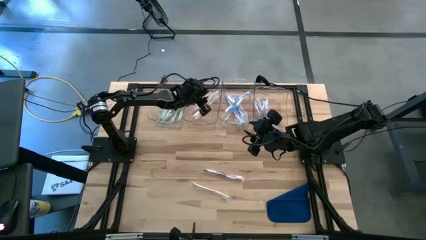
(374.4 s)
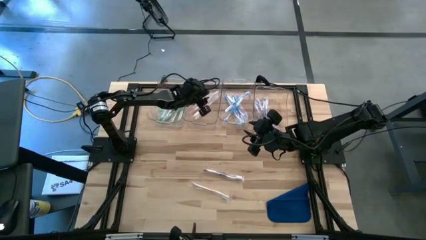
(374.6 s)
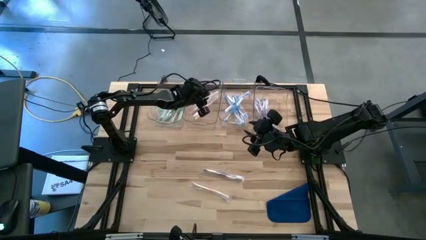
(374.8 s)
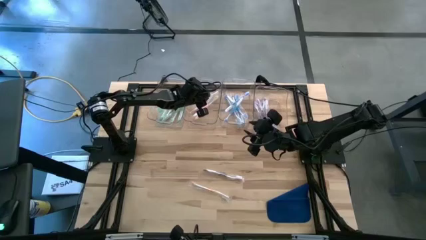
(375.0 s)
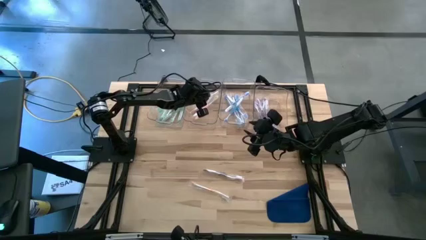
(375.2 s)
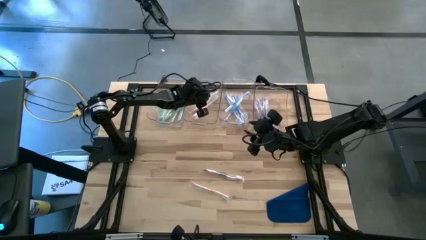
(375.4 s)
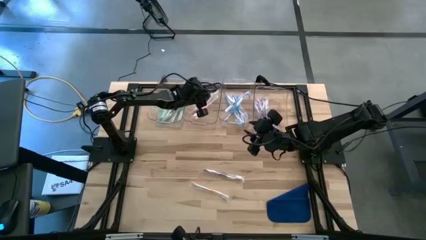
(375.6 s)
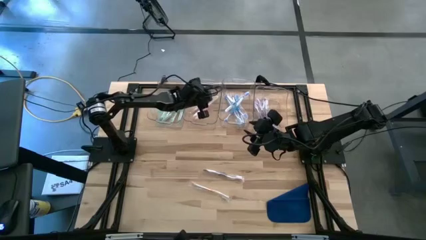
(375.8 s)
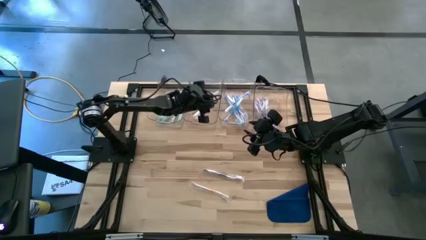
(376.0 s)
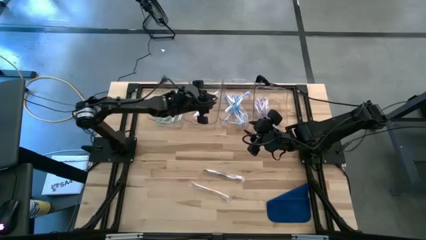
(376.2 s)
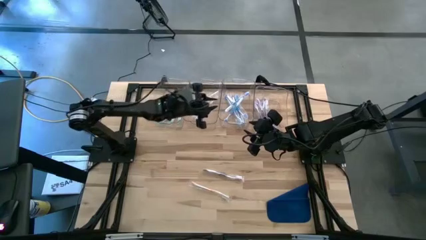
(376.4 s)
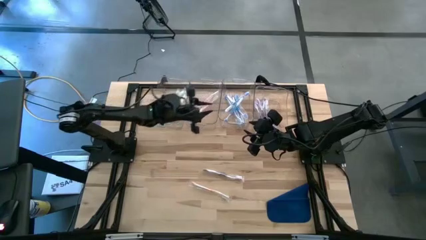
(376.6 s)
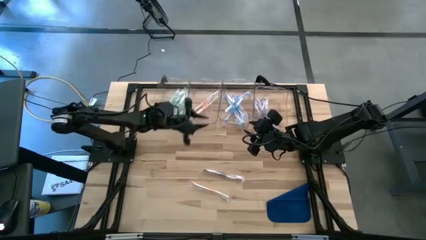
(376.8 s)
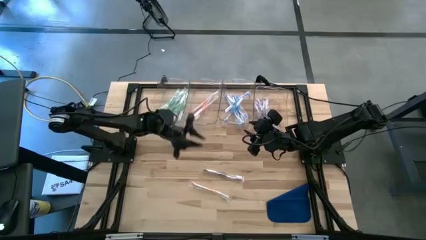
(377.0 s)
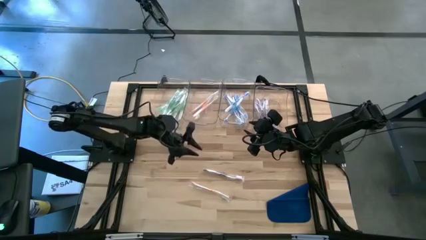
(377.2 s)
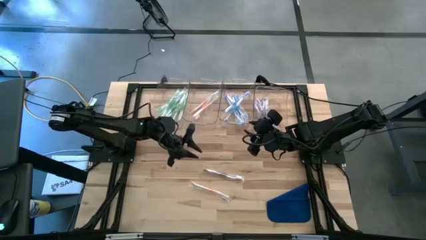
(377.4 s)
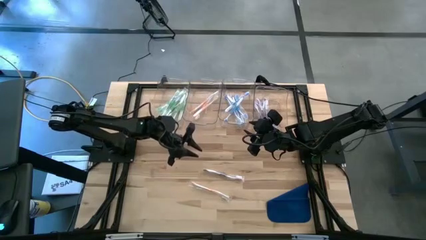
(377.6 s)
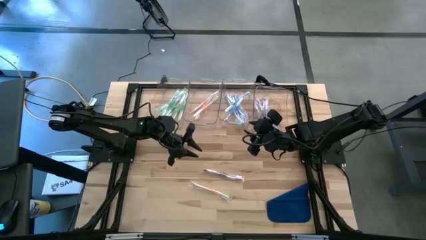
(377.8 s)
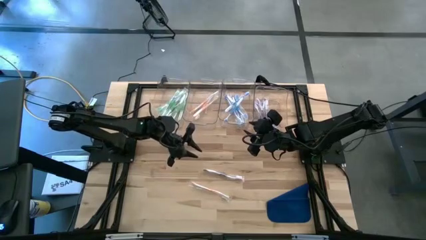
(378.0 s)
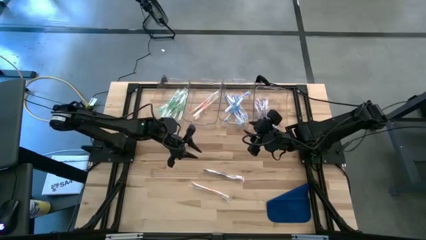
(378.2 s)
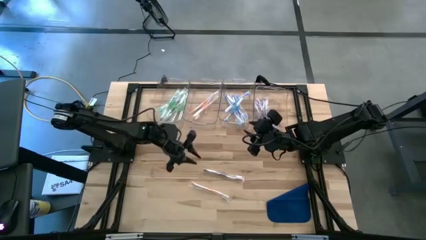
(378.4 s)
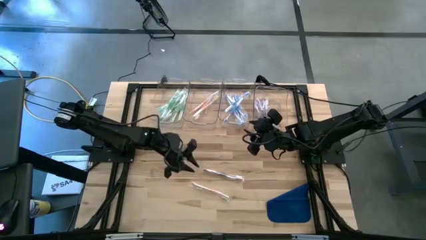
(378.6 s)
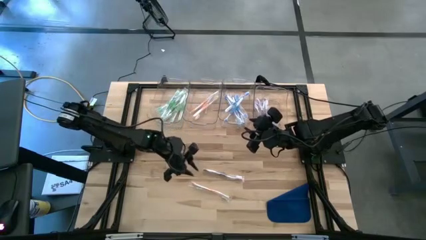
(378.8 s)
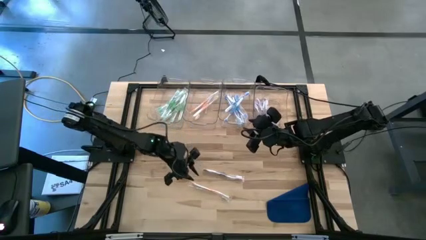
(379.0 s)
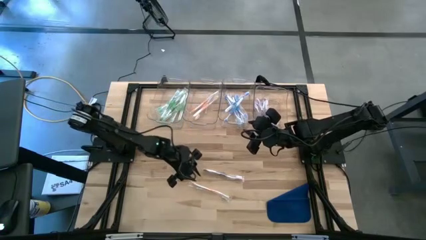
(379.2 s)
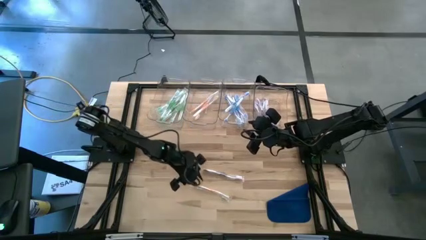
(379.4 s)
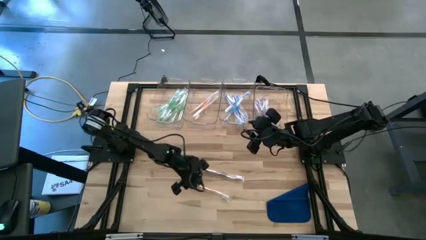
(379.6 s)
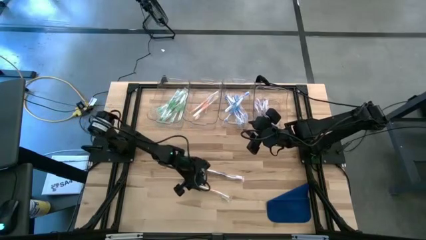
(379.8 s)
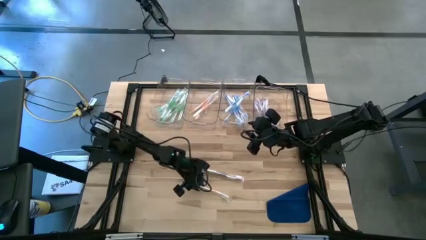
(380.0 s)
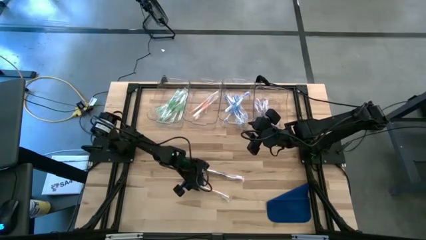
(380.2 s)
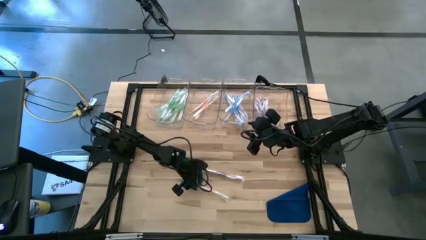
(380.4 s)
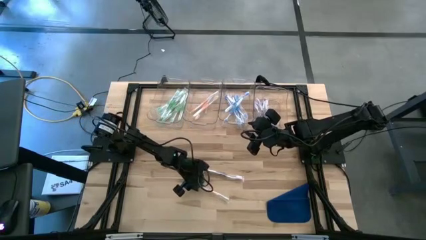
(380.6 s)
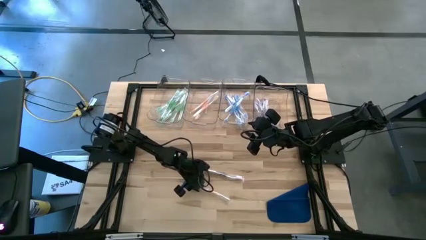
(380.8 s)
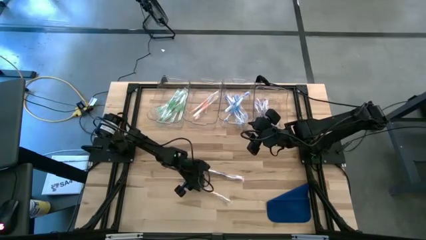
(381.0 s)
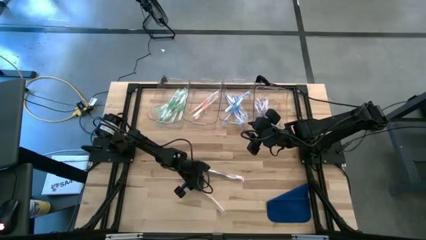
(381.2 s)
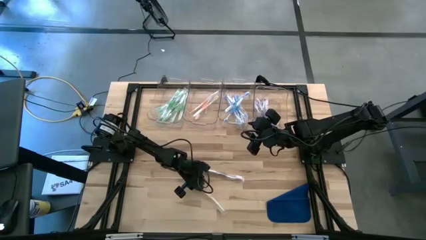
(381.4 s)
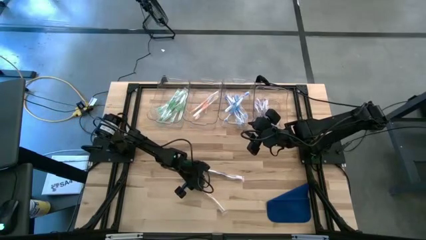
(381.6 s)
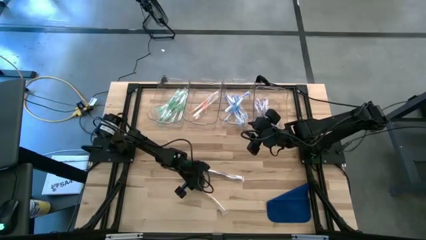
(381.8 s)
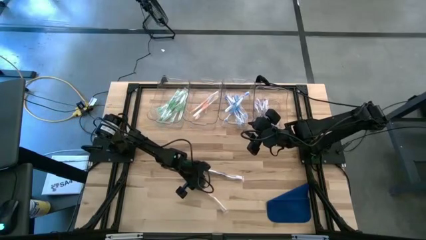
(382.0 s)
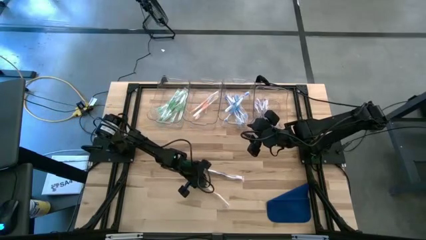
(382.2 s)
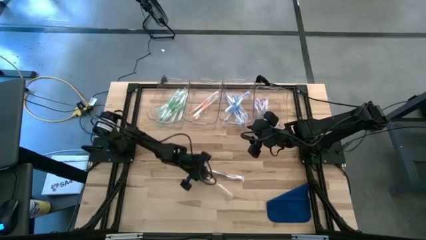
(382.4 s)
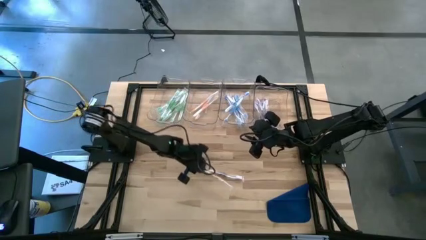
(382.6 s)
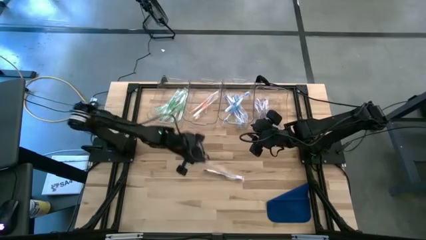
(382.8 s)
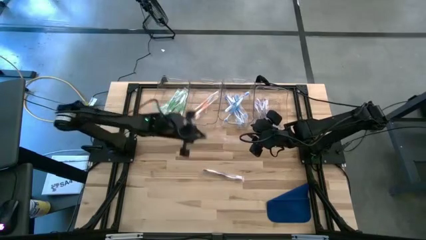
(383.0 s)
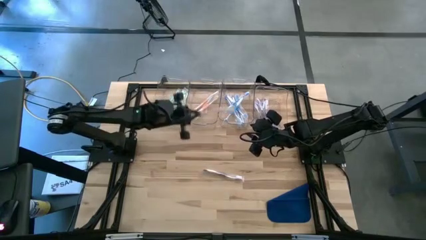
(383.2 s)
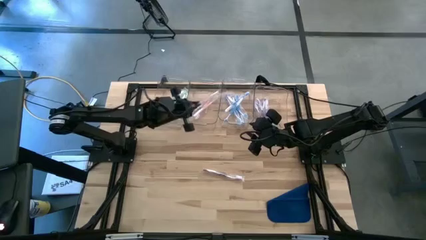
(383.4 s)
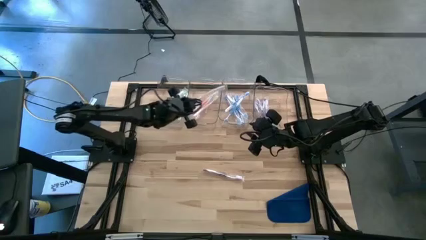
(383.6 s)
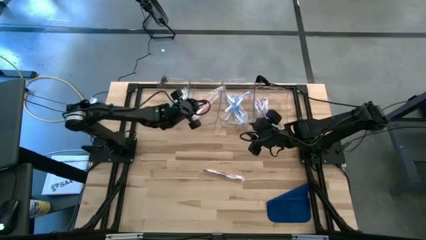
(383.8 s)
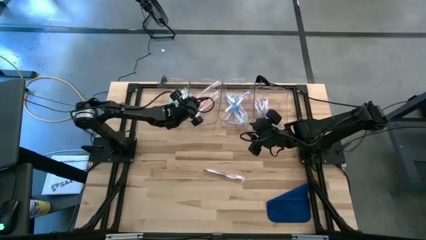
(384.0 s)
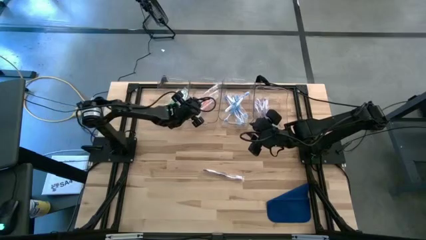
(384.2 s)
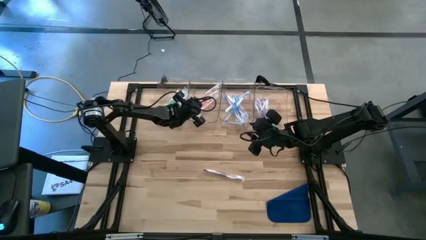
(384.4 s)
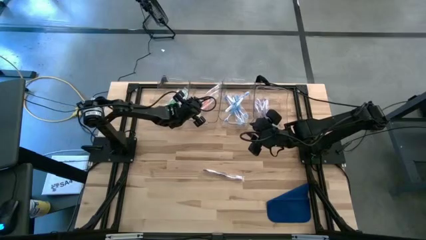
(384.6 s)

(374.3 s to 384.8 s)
Task: Pick & Place Toothbrushes
Put the orange toothbrush into the middle left transparent bin

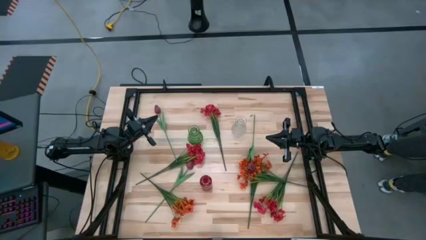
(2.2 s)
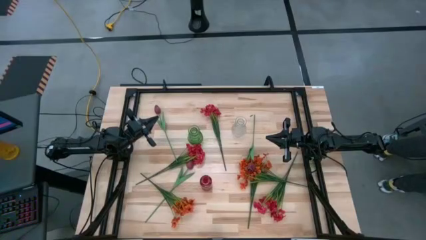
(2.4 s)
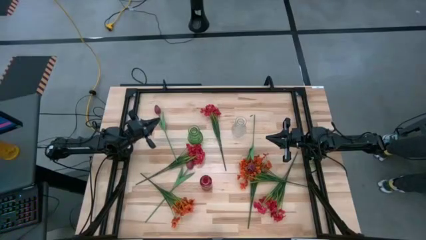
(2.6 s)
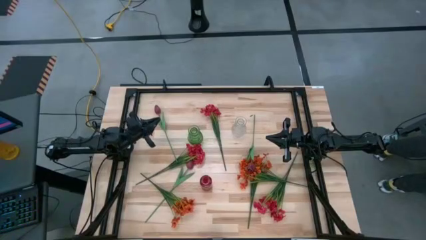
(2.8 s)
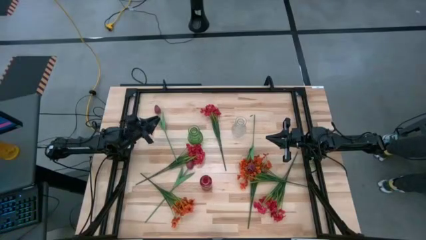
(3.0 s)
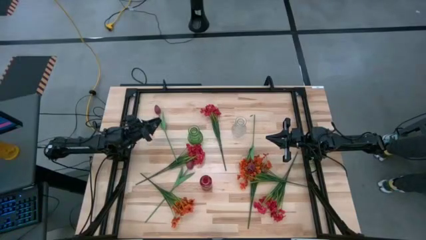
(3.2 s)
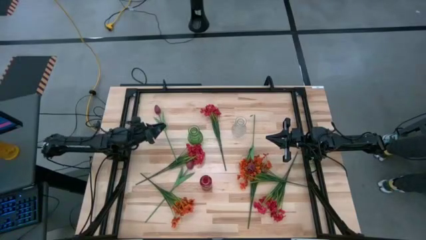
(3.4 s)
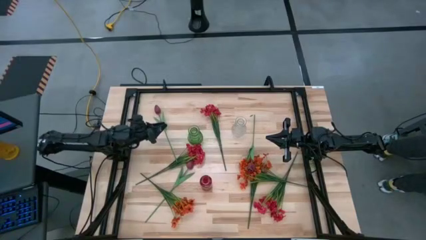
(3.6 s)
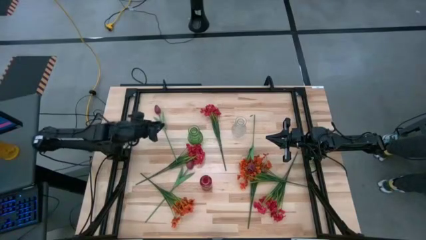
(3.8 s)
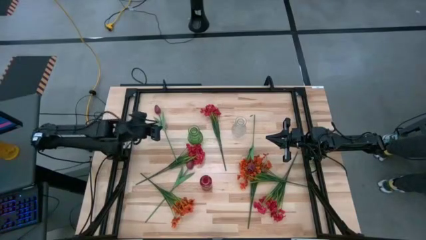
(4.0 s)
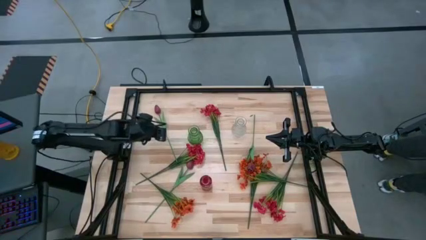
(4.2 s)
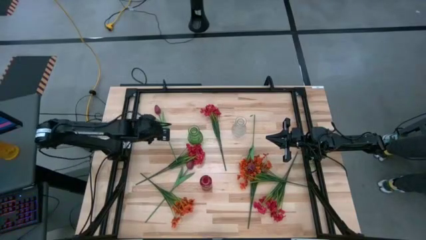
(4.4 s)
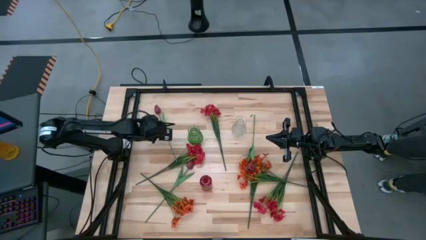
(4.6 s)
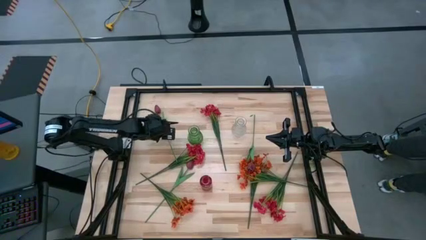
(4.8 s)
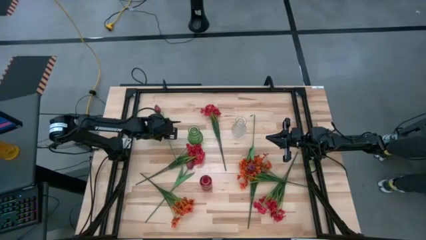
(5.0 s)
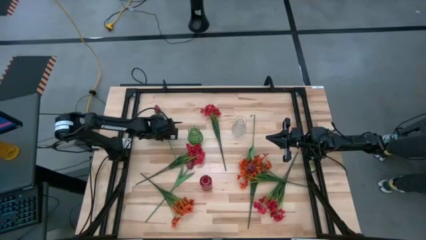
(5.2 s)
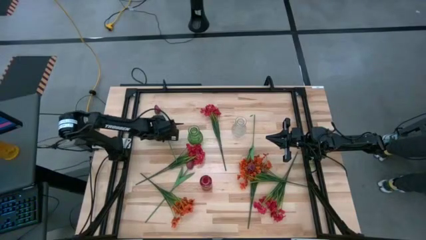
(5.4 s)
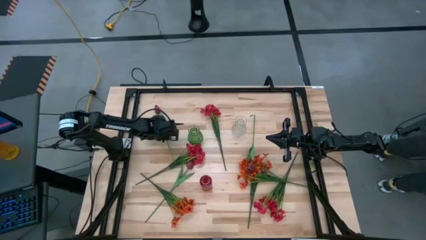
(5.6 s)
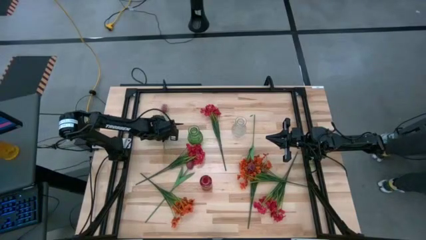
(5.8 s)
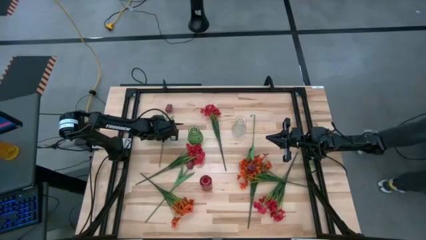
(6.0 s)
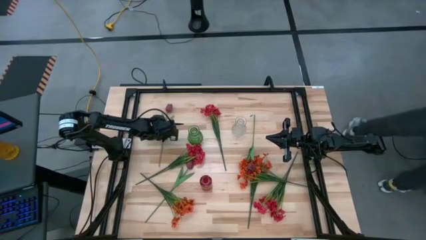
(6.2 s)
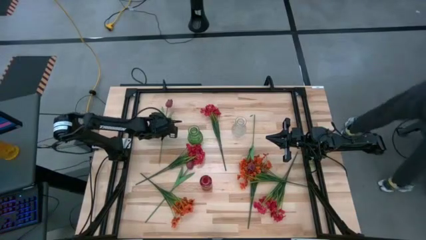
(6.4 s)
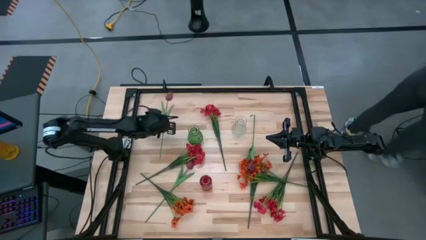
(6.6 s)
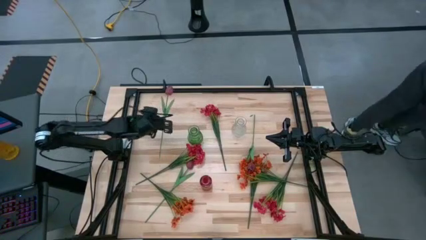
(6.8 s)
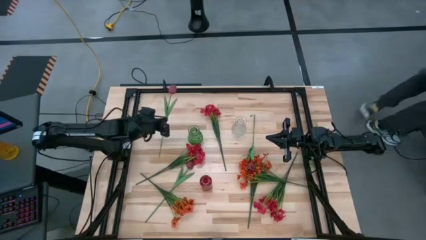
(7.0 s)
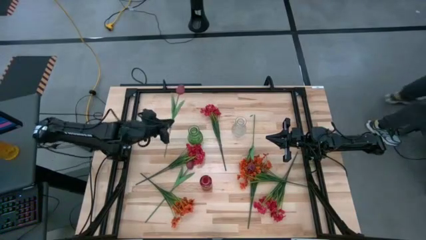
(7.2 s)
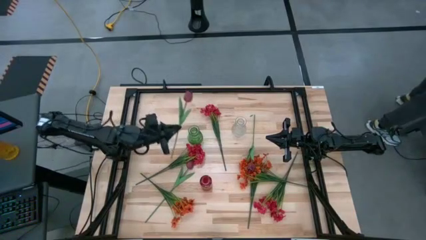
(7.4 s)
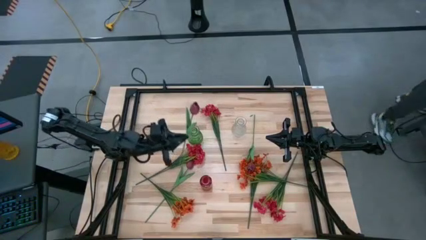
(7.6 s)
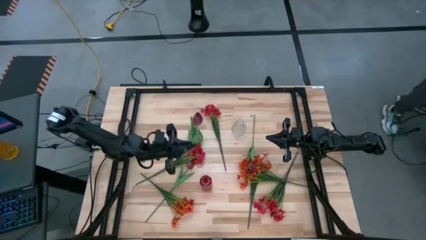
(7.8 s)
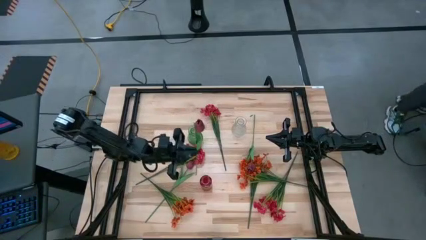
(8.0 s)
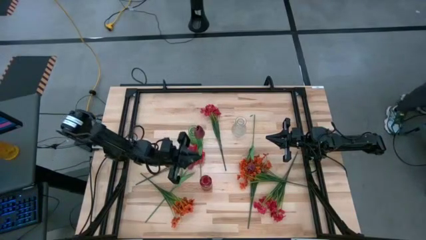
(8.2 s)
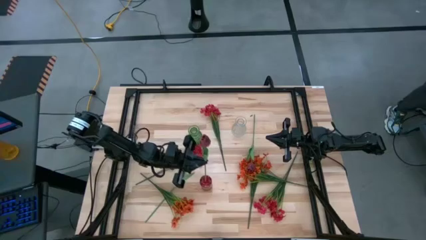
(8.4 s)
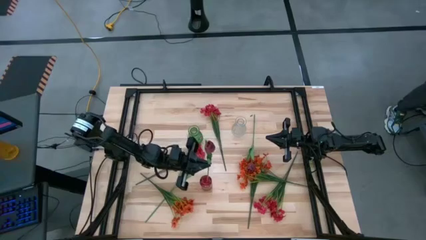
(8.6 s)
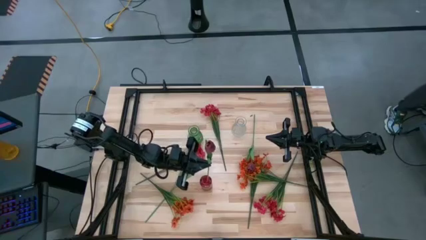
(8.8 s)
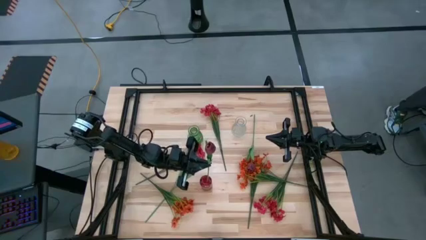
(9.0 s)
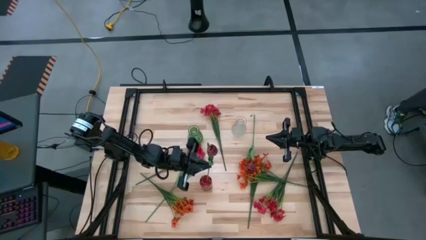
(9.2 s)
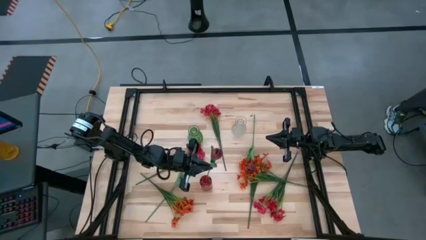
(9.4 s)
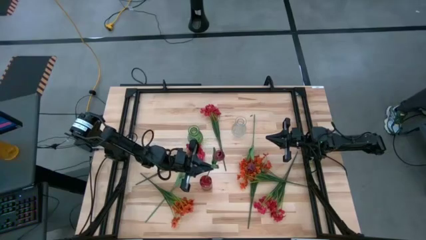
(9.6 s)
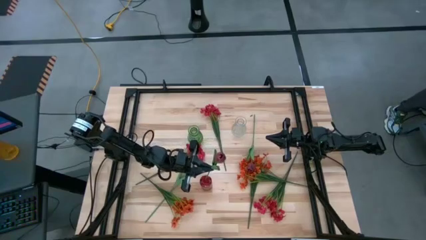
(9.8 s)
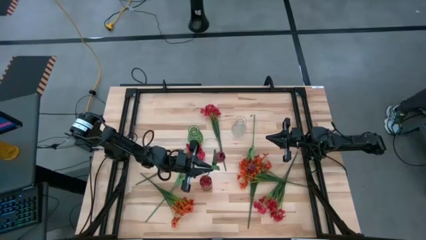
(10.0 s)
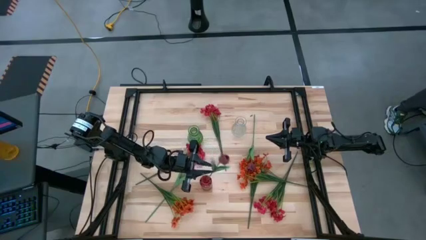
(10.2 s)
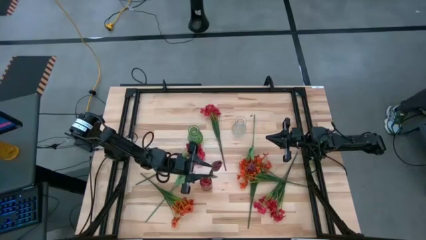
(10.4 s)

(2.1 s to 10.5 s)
Task: Sort flowers into vase by color
Put the top red flower into the red vase
